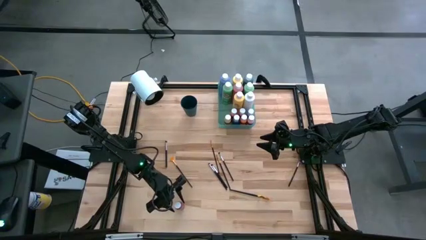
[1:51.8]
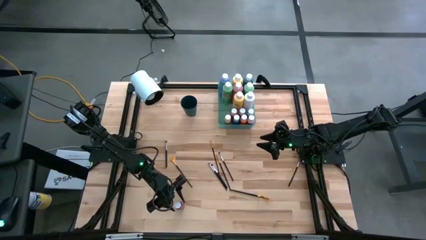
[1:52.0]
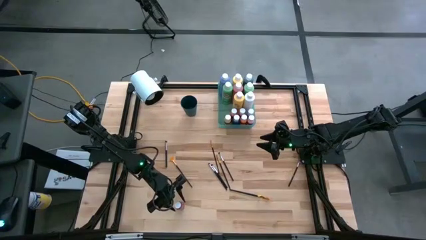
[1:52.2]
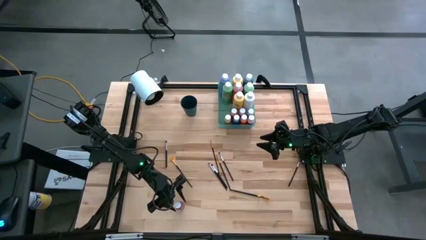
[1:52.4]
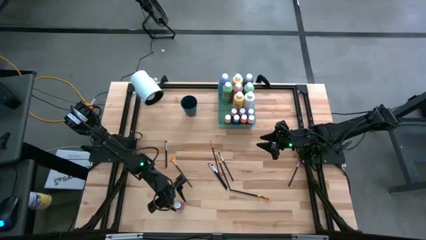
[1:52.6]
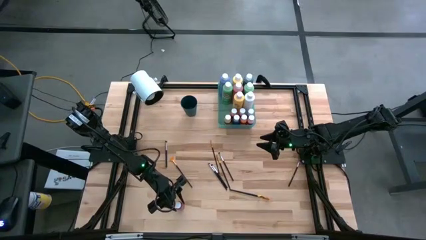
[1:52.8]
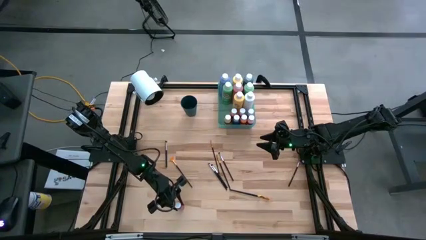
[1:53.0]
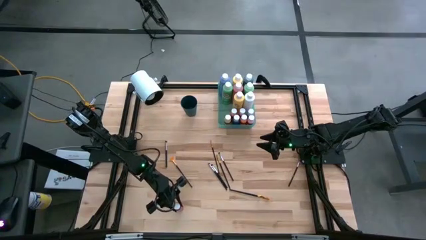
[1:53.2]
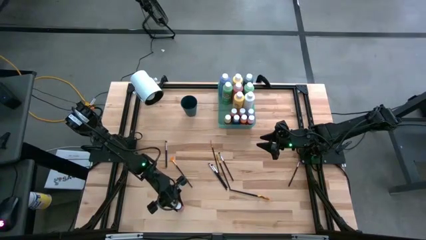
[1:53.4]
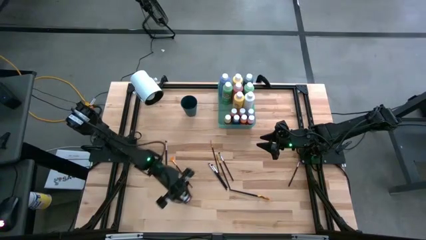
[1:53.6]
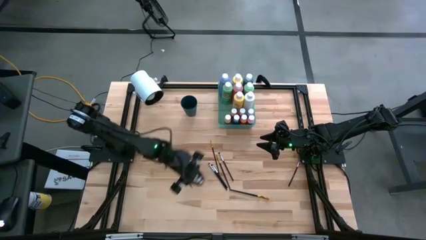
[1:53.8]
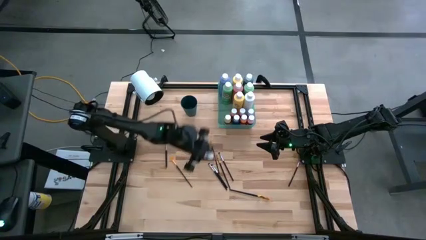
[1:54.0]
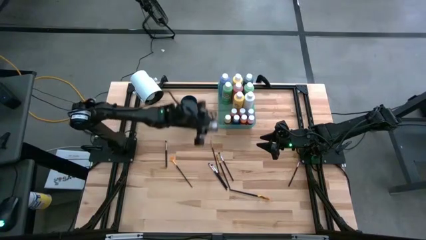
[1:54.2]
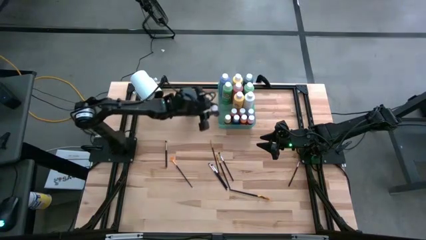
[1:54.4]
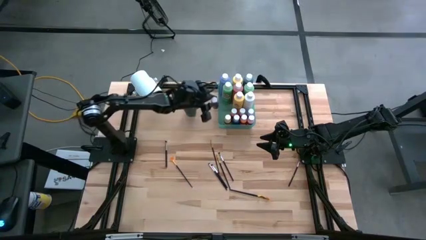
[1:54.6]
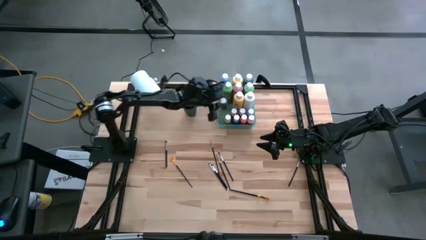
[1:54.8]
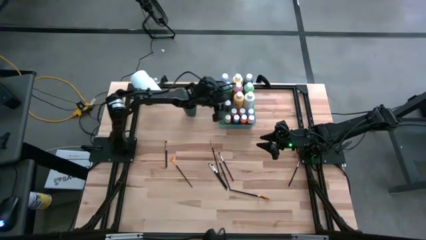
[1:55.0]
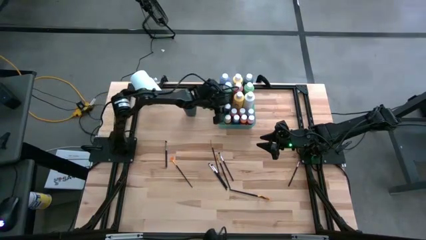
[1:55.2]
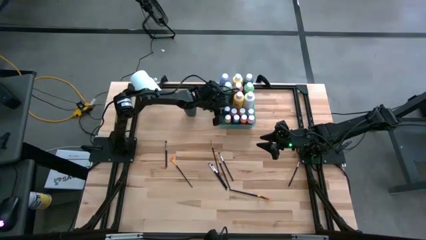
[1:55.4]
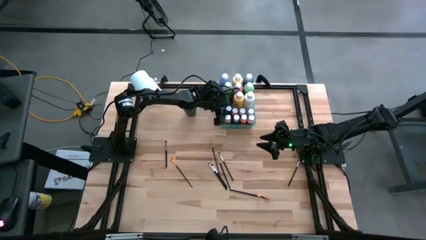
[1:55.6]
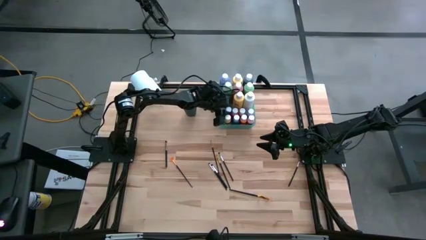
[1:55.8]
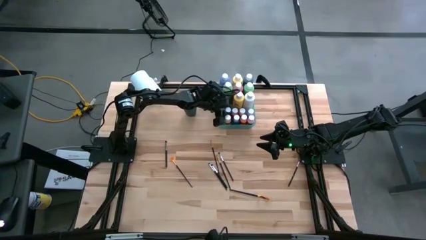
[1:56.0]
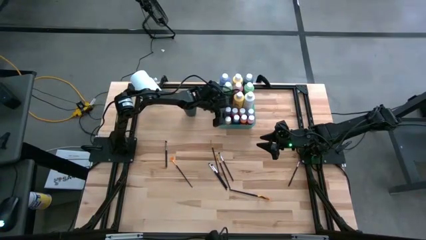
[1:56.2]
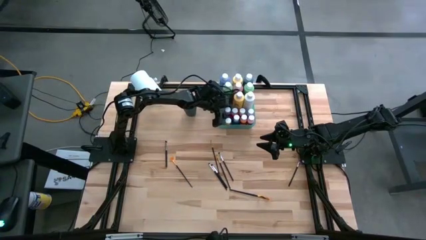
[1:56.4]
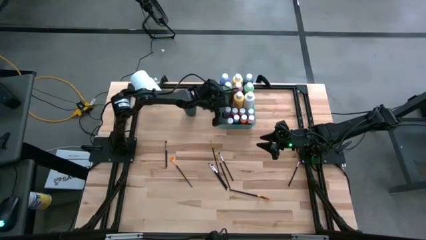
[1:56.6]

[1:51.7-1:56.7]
Task: Pick & Place Paint Supplies
Put the pink small paint bottle into the green bin

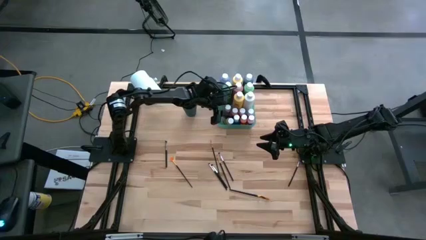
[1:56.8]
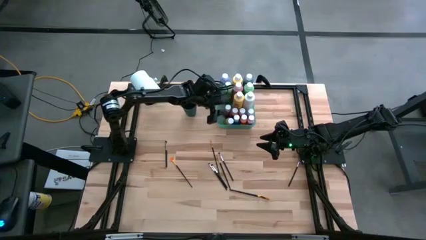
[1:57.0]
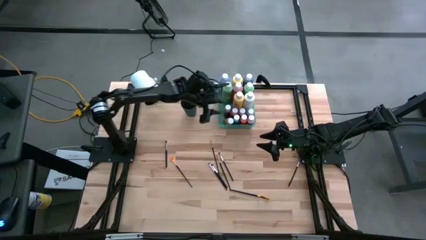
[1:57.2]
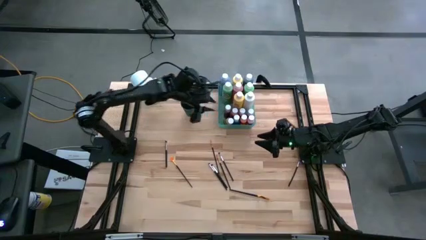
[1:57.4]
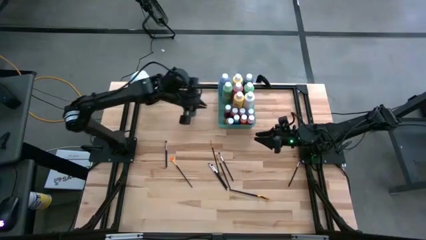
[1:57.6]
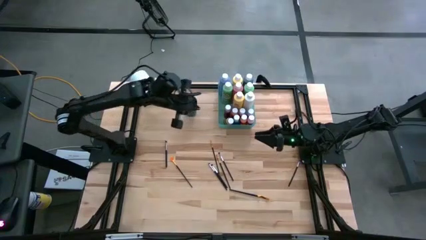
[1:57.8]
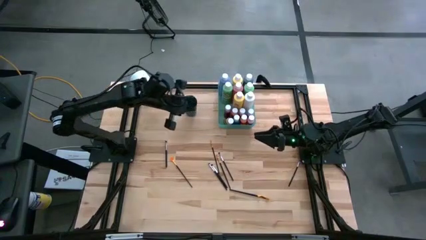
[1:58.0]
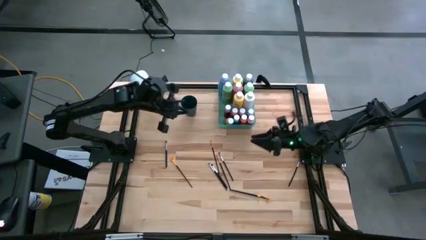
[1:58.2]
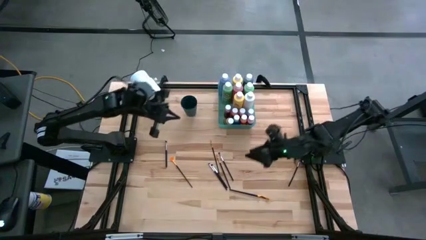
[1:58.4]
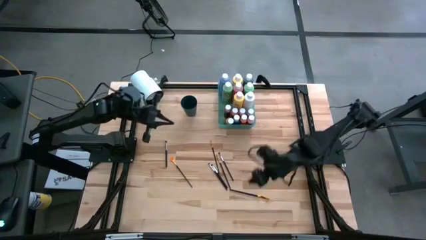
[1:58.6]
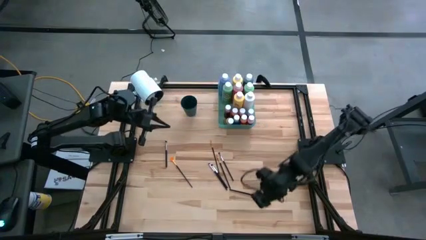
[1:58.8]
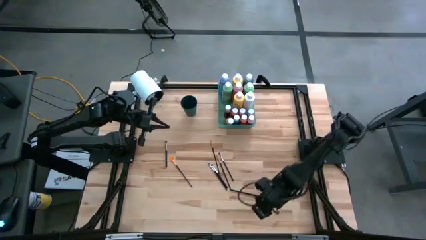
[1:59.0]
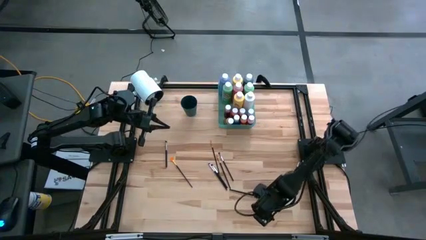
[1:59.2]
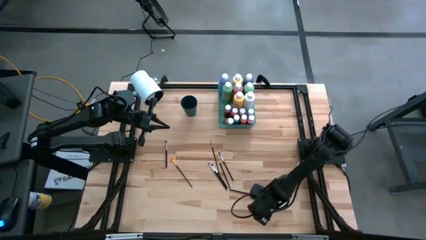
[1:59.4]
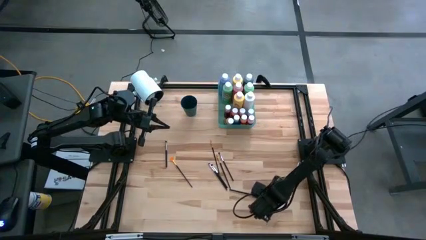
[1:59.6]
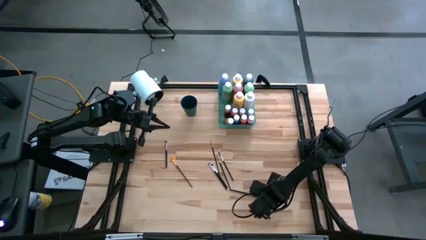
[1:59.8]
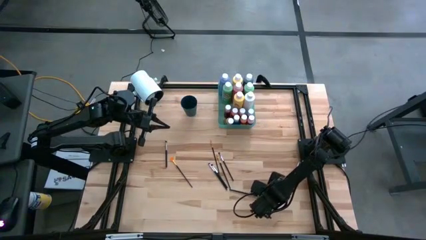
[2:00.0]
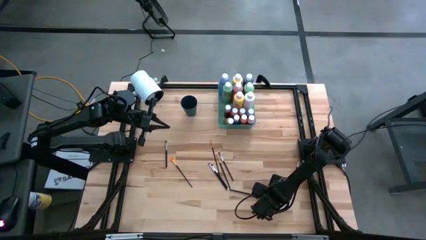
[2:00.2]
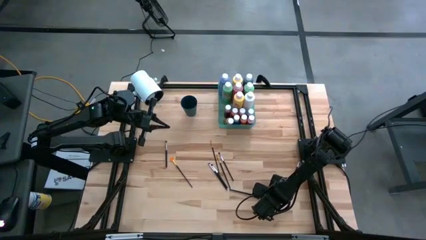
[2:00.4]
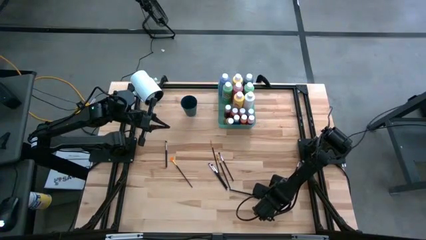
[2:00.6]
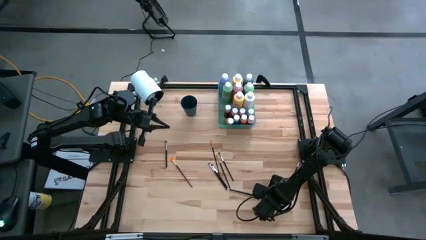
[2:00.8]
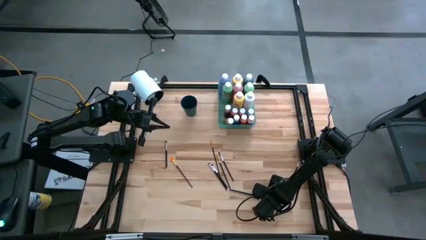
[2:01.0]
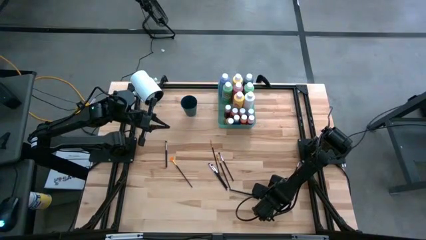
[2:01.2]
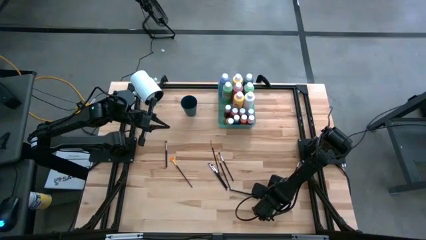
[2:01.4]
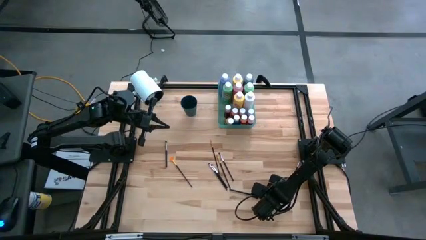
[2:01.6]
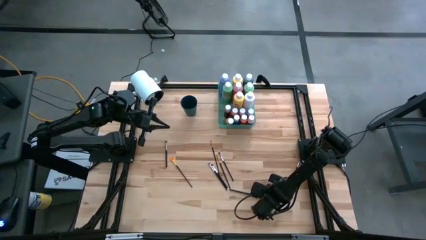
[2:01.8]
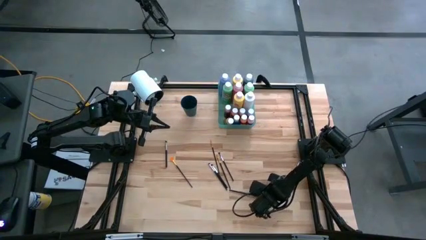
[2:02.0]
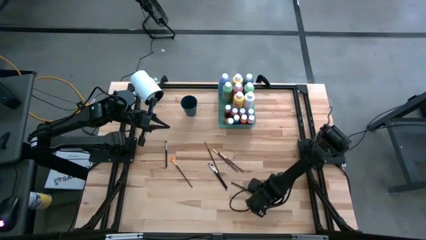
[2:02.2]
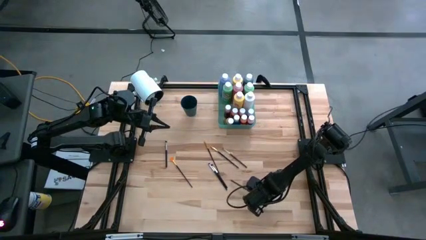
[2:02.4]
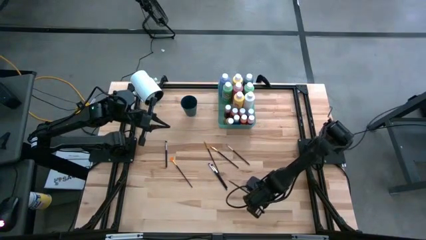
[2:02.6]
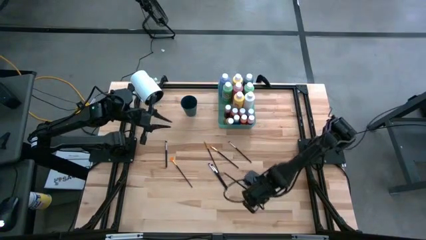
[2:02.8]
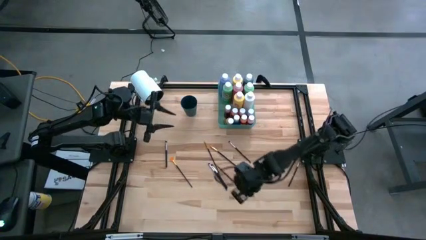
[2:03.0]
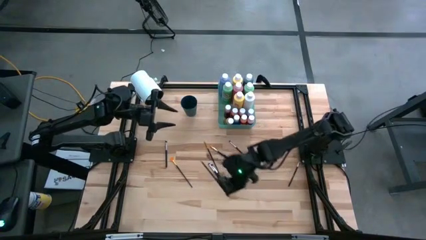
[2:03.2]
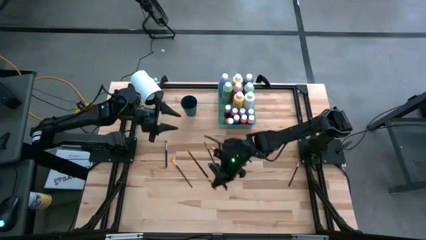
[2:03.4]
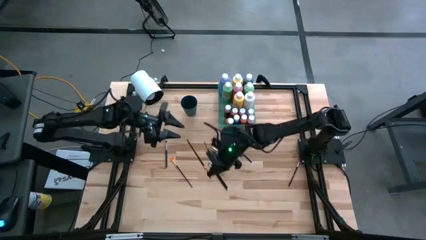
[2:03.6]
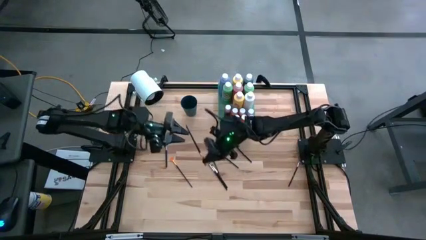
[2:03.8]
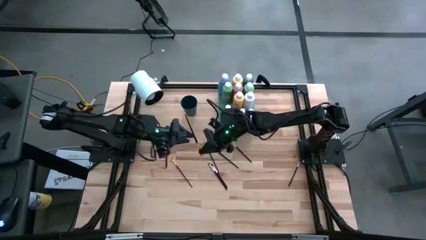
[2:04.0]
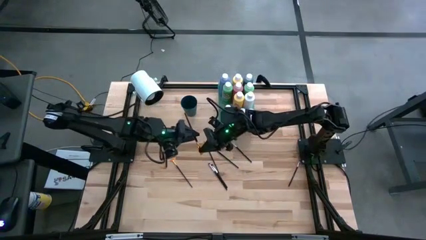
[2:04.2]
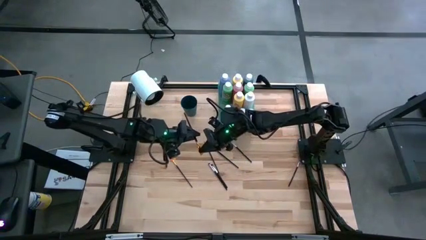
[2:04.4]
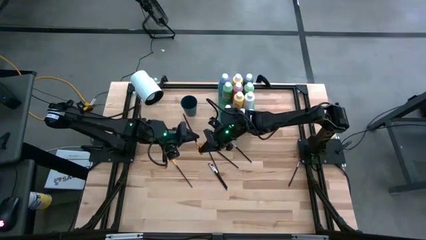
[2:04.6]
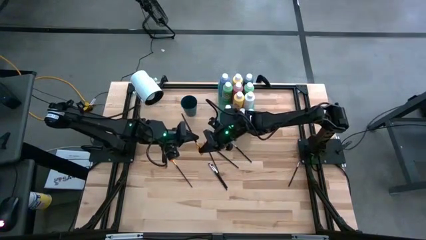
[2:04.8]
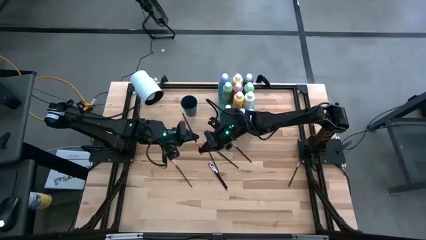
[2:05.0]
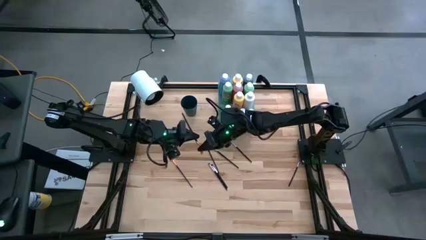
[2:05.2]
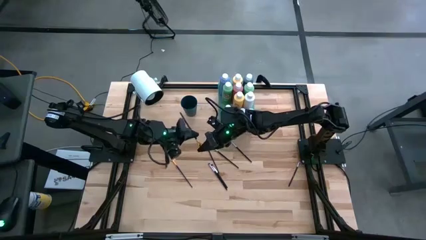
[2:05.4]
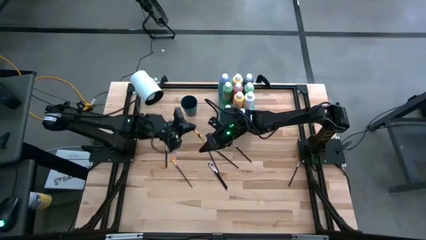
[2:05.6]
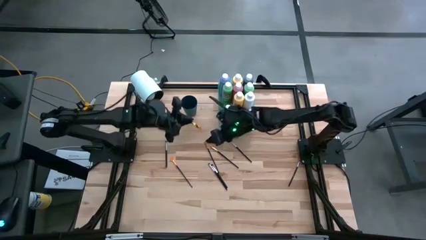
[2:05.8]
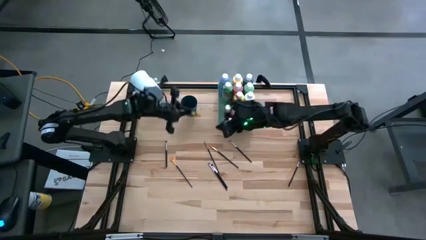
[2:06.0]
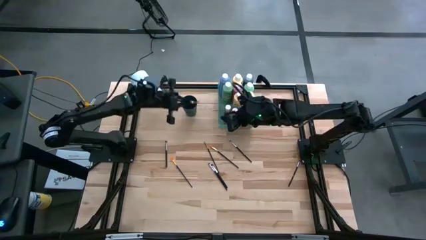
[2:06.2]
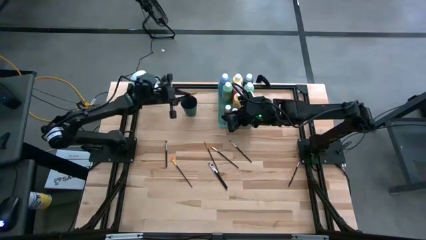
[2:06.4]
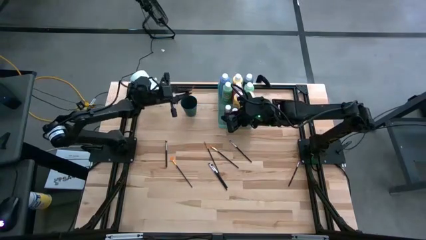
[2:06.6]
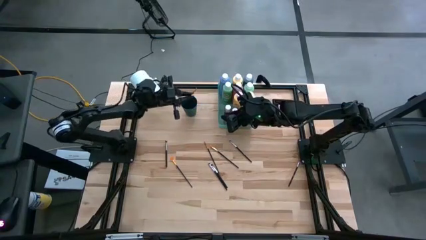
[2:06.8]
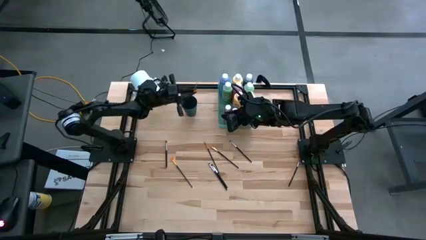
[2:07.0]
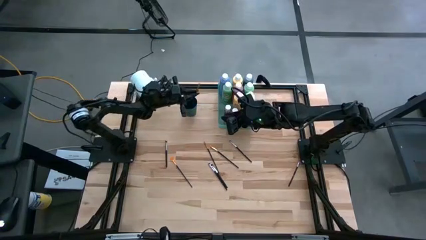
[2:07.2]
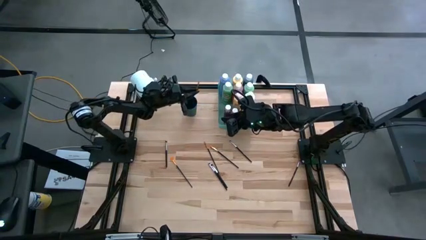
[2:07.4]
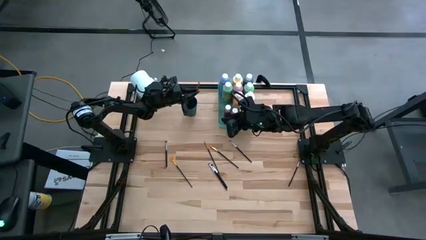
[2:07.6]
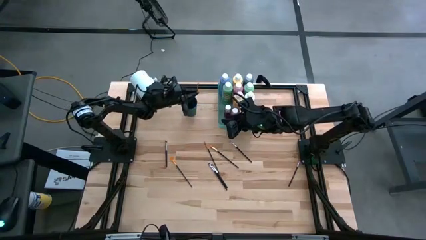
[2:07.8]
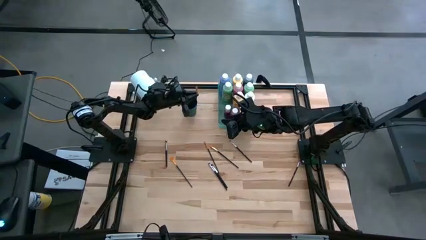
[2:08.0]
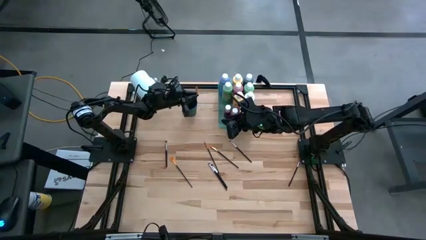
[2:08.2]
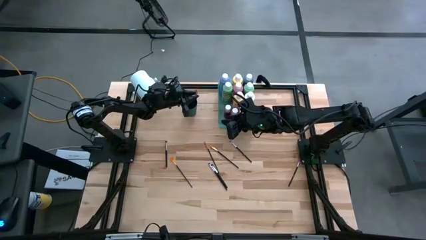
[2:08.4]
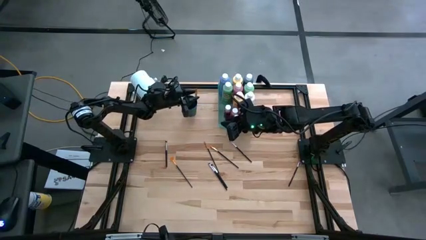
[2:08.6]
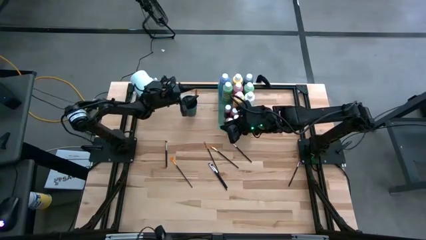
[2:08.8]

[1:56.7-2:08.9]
Put the black gold paint brush into the black cup
